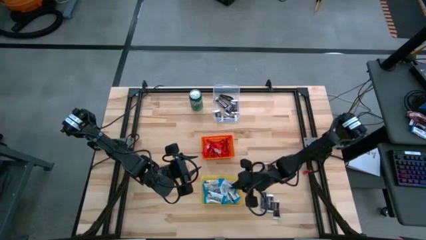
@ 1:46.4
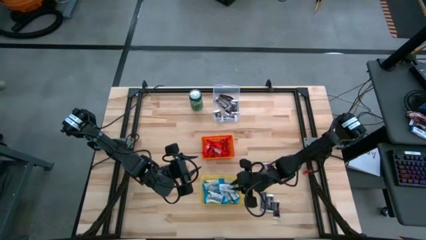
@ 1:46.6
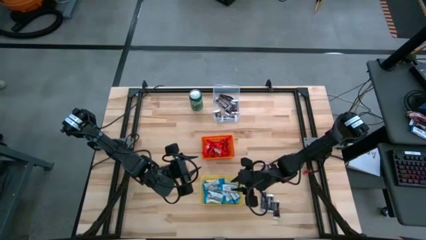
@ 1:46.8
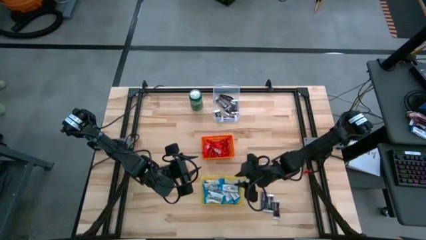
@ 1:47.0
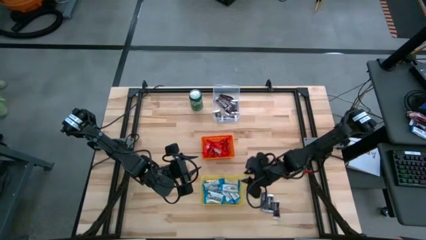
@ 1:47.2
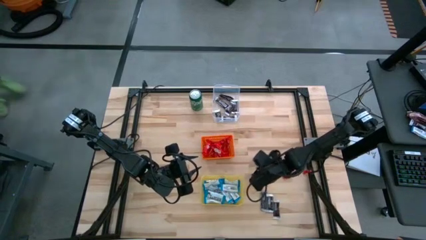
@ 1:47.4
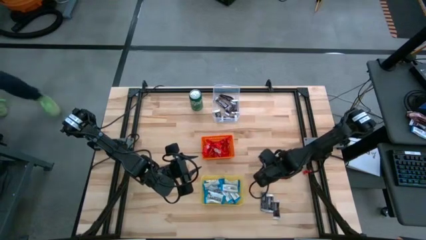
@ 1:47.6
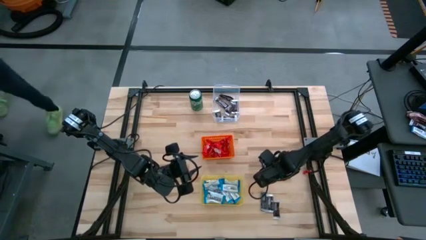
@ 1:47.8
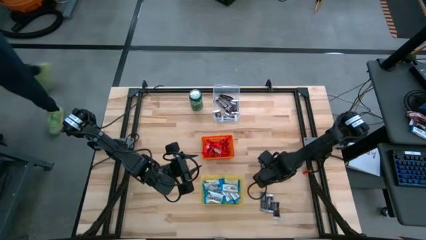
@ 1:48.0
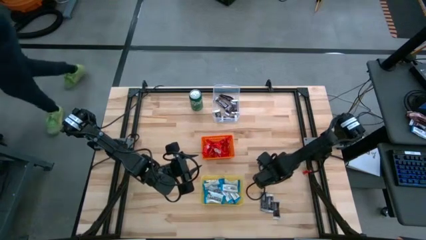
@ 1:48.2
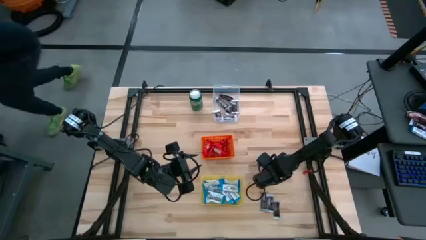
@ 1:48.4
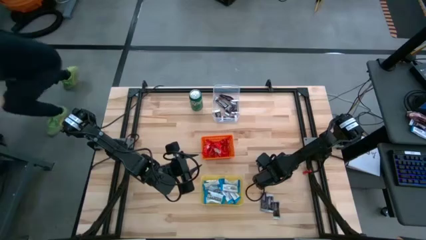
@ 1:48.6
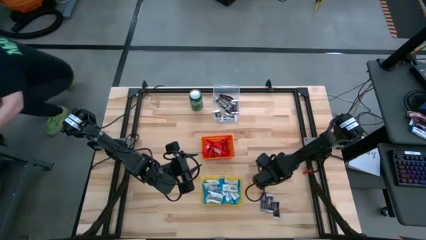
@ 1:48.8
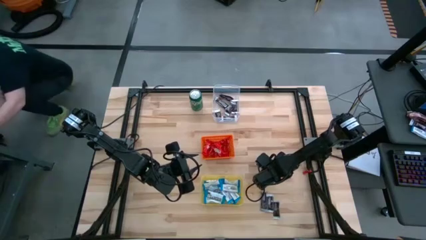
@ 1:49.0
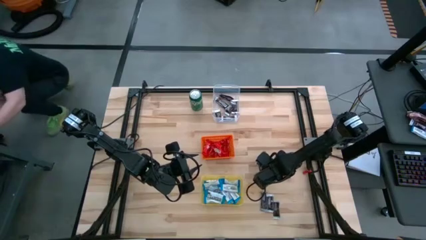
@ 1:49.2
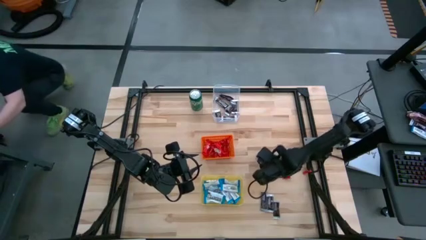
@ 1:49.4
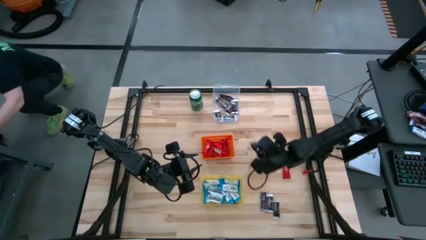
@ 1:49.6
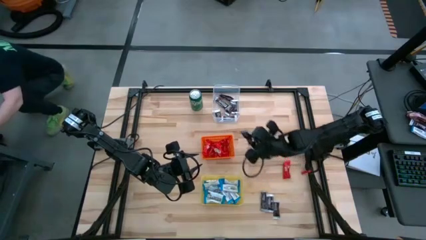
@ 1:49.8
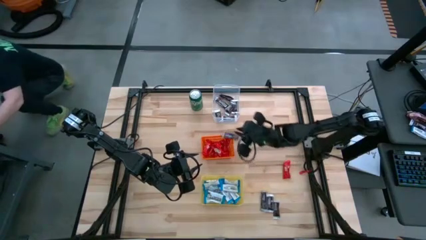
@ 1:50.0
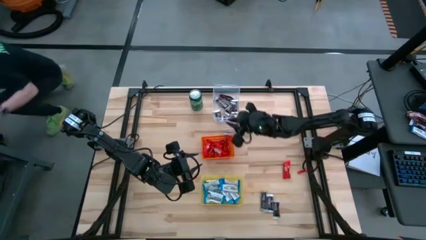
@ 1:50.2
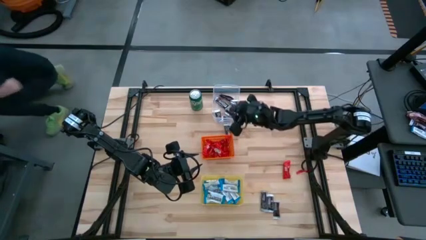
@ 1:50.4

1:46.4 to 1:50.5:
Task: Sort candy
Put the black candy into the transparent bin

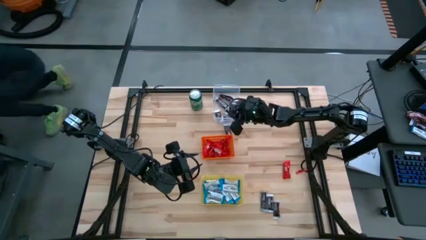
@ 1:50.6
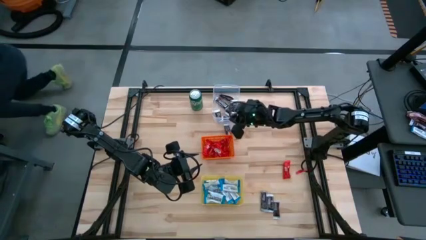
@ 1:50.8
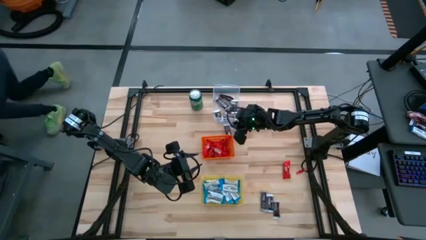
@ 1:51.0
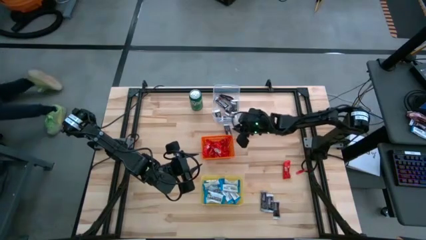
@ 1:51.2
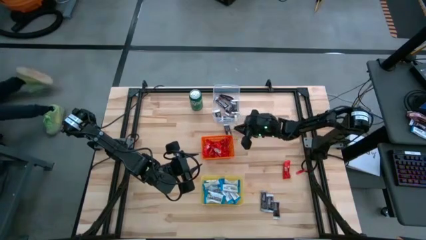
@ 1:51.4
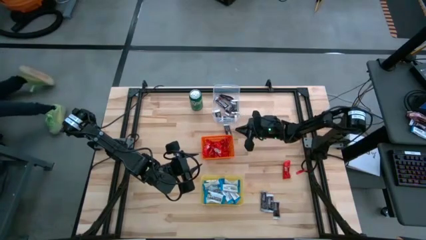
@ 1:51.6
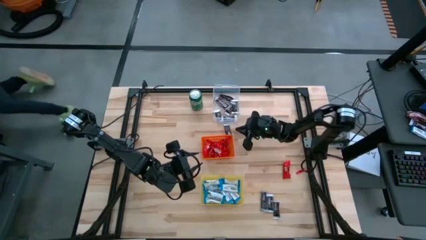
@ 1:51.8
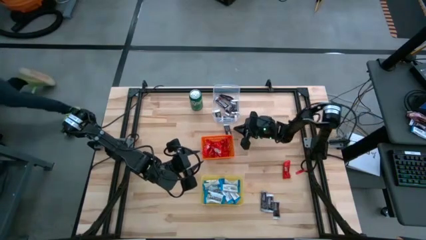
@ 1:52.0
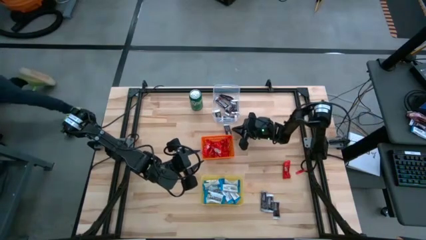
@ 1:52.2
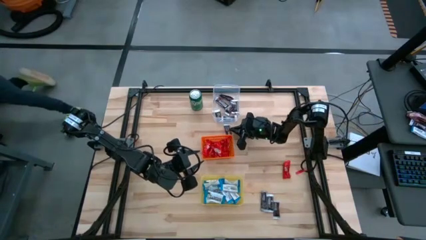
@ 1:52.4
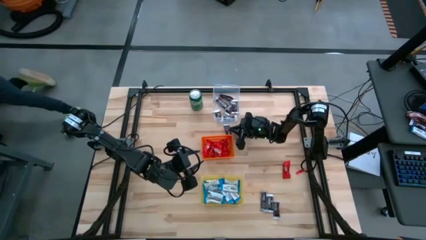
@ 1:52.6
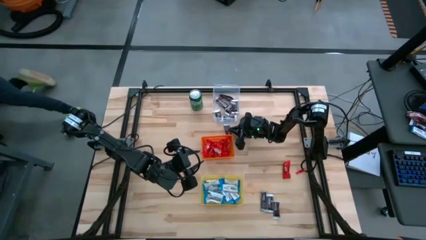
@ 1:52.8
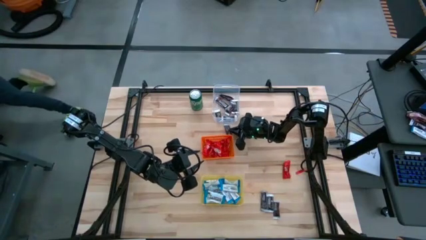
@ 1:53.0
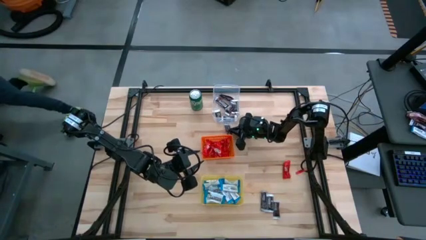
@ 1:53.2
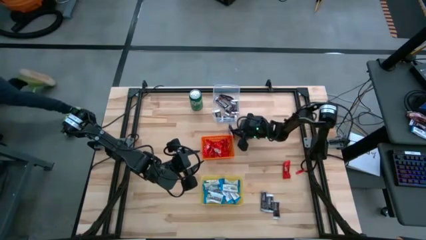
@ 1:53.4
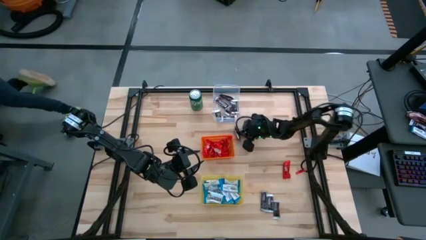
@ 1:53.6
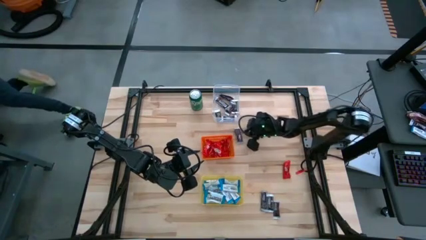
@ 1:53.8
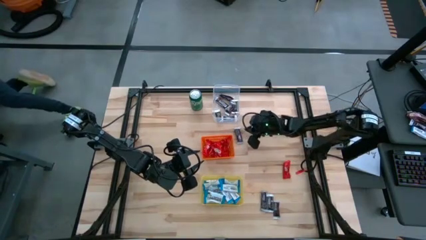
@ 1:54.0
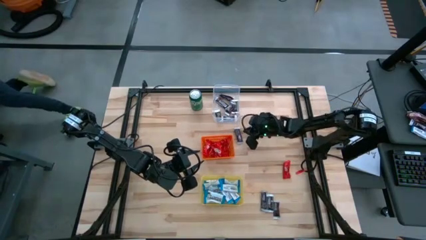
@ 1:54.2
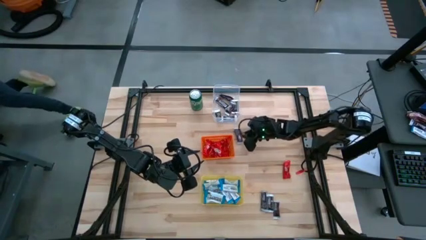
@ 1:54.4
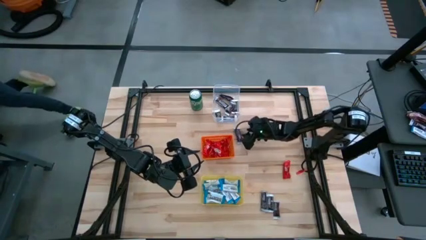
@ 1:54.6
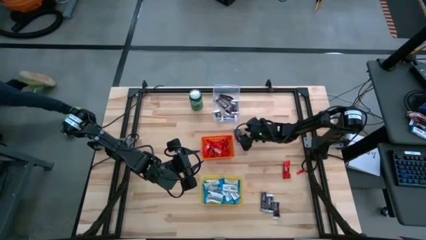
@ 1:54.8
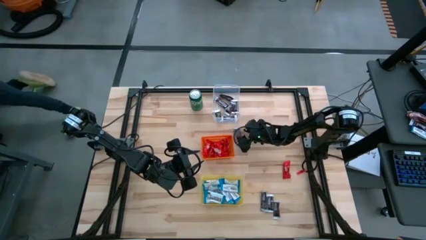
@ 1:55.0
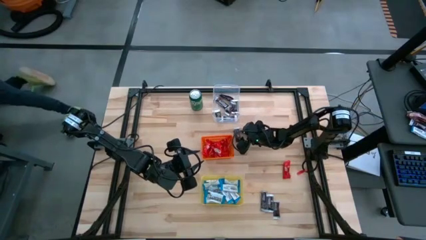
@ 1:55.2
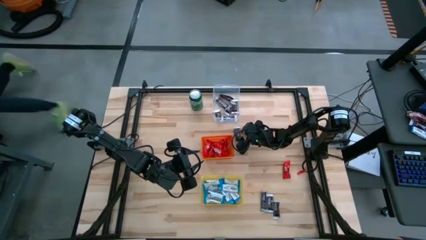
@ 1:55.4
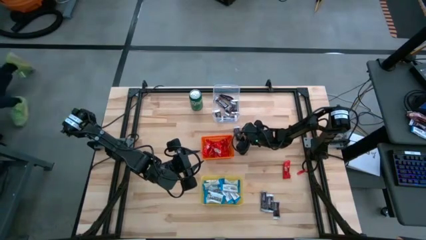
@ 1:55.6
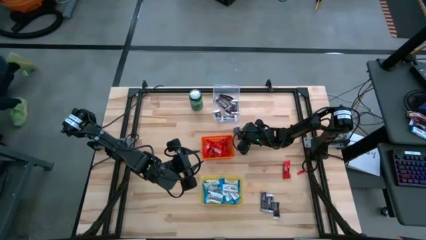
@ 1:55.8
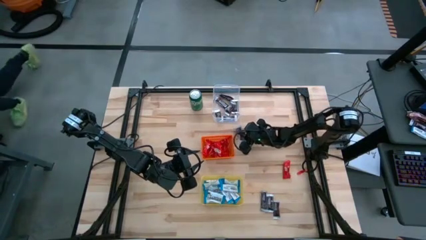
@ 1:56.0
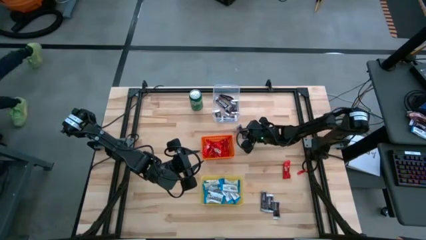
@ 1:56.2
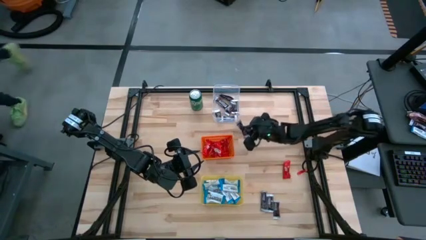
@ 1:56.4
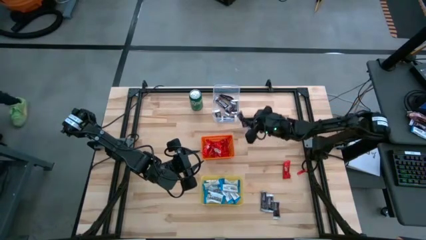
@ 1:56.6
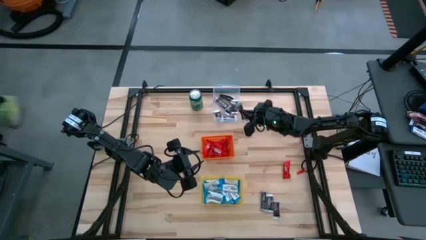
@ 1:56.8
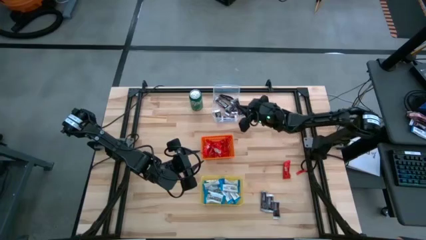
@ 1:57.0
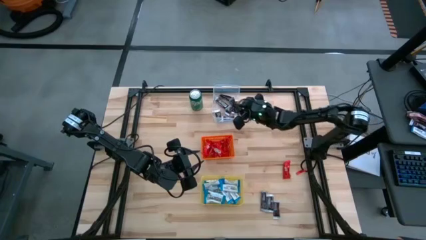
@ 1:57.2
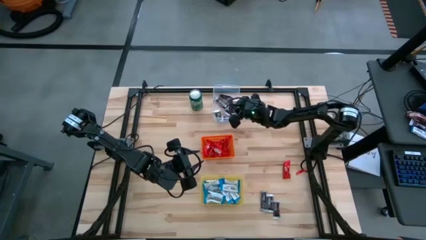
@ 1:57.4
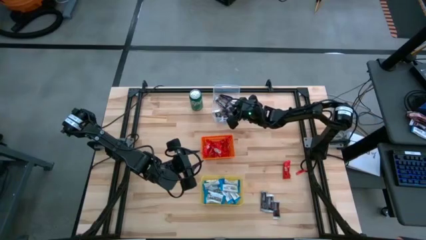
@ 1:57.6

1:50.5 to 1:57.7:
Put the black candy into the transparent bin

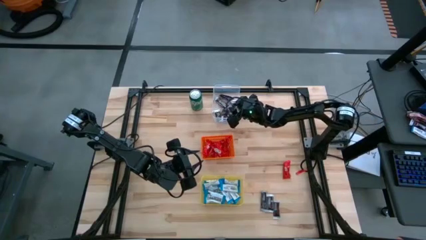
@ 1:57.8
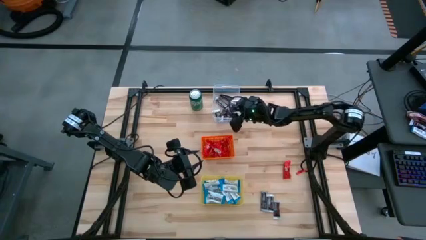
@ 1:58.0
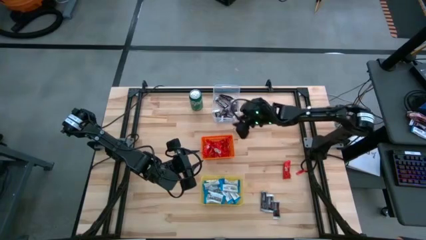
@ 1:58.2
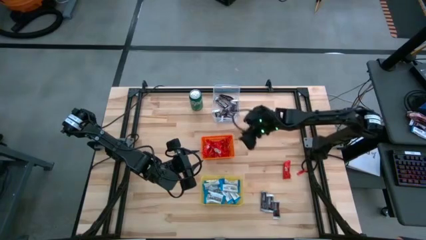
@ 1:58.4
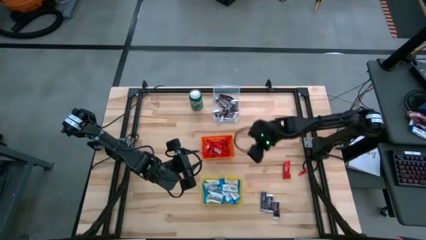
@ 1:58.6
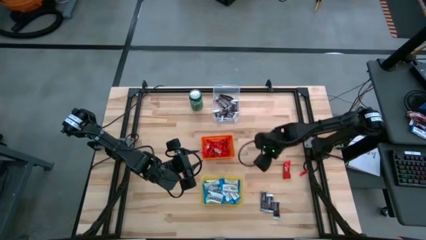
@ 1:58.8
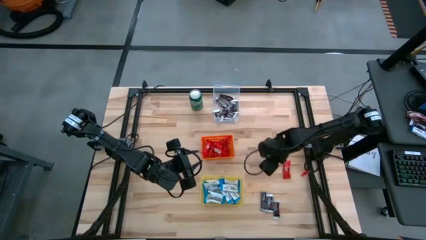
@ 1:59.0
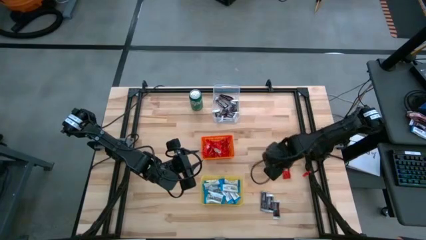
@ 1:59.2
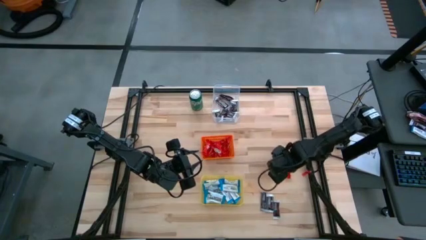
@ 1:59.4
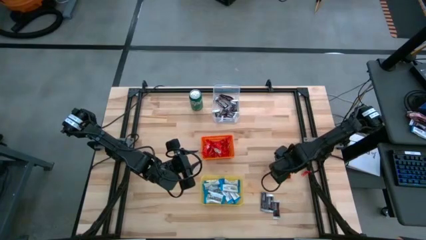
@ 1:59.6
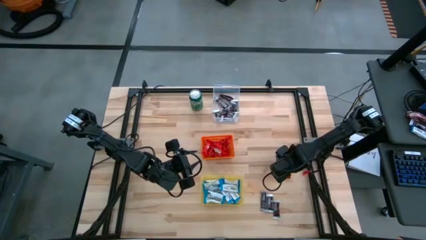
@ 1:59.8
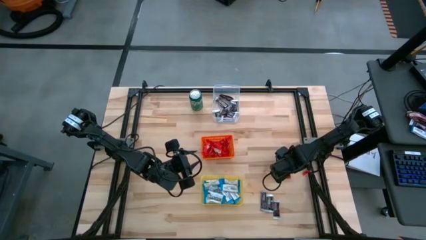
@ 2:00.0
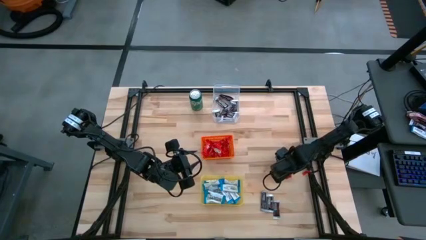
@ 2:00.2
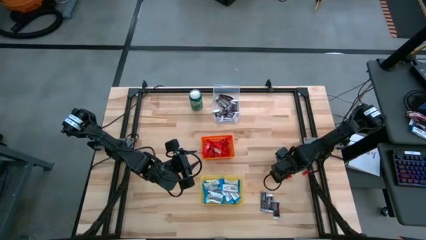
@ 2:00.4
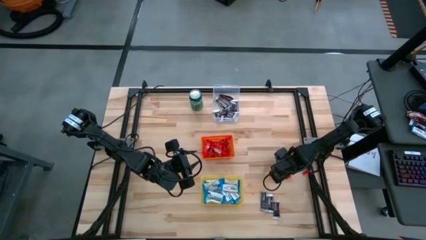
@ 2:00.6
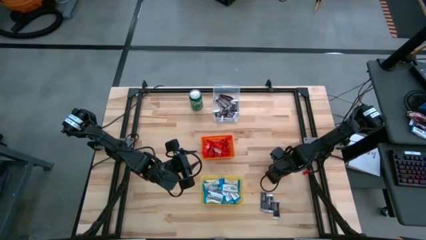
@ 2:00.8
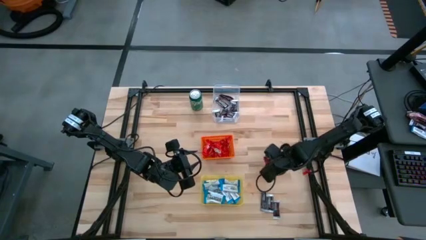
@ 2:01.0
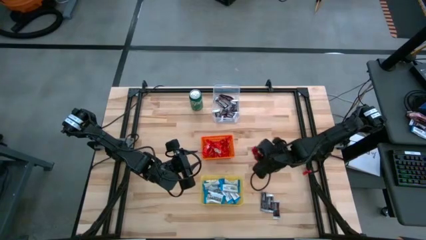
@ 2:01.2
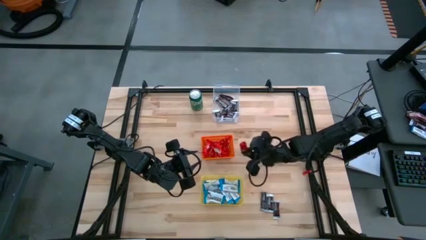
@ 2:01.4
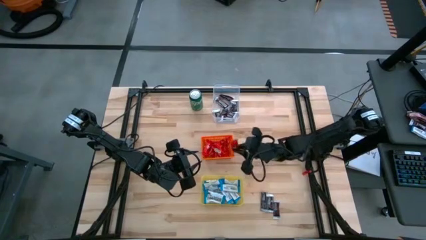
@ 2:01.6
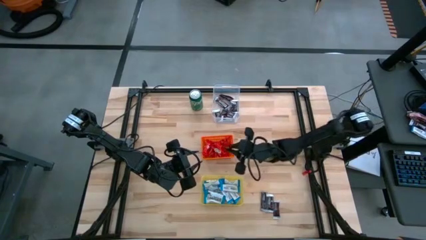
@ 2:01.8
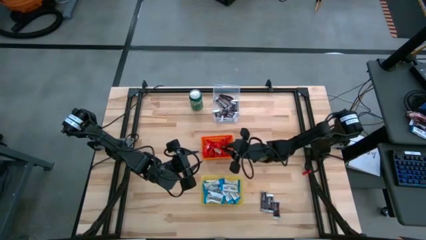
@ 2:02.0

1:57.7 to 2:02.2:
Put the red candy into the orange bin

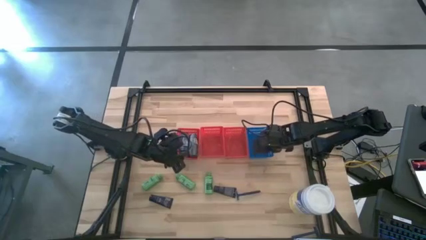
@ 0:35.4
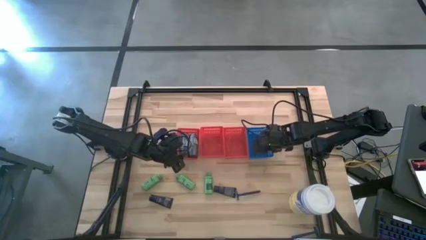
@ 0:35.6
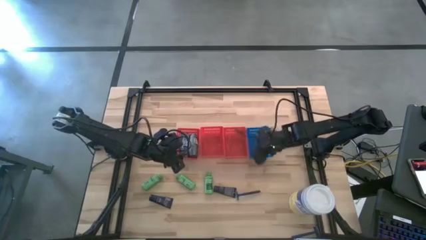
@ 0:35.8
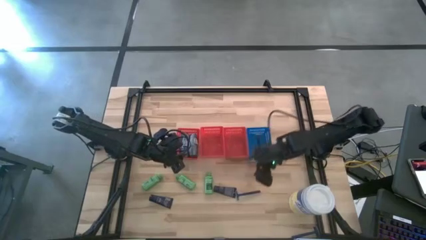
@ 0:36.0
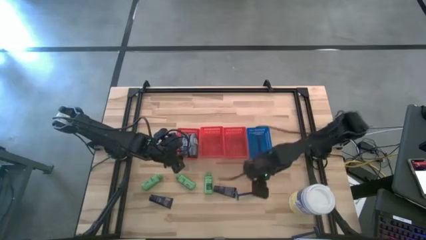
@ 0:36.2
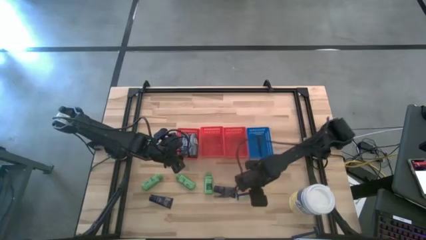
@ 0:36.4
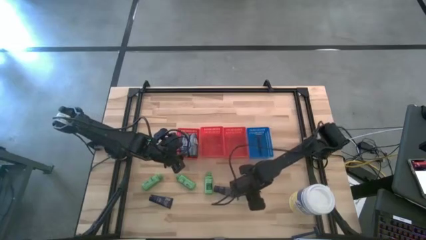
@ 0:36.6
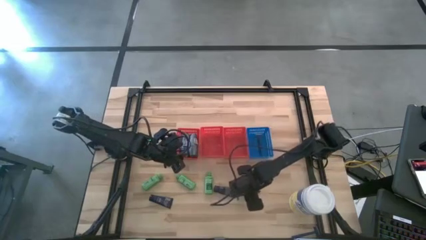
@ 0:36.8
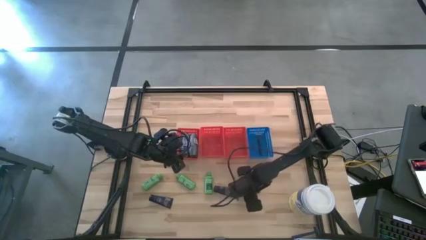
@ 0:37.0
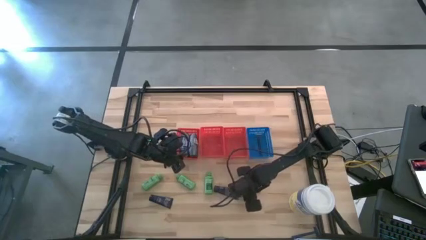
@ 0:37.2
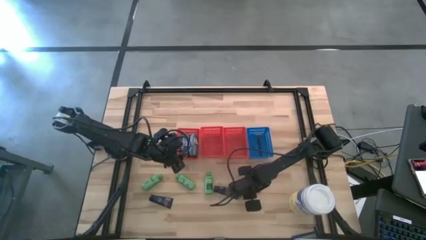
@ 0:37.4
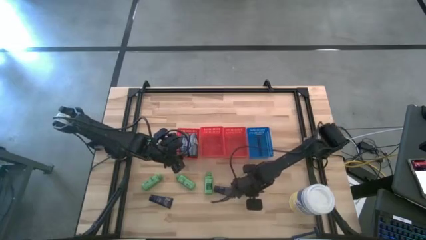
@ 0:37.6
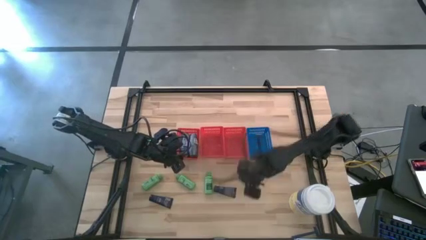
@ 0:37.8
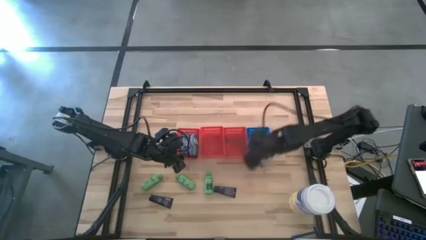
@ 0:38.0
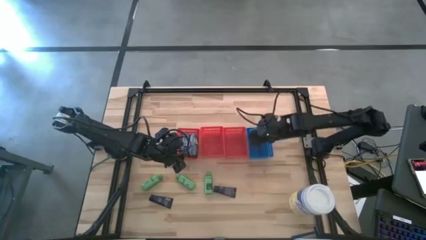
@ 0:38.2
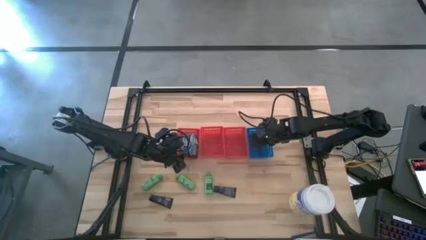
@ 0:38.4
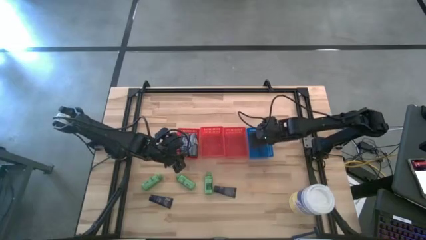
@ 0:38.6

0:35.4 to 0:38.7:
Task: Pick & Place Travel size toiletries
Put the blue razor into the blue bin
